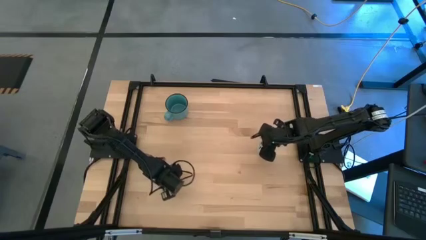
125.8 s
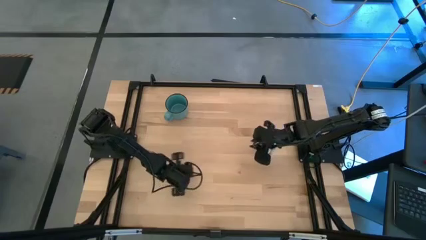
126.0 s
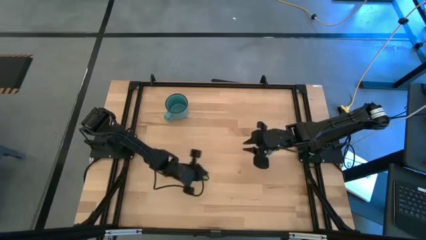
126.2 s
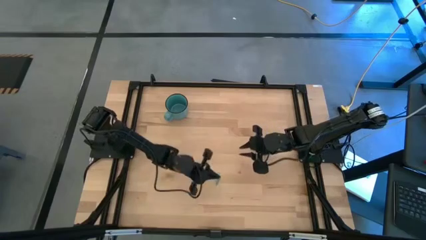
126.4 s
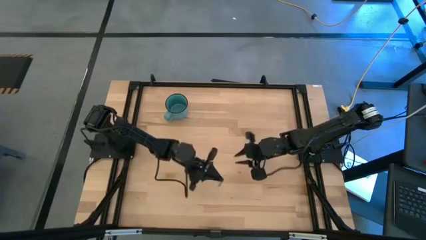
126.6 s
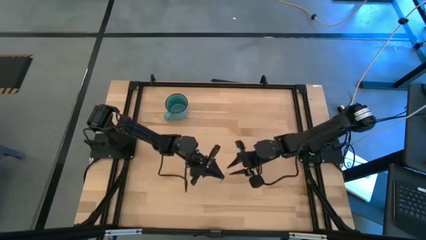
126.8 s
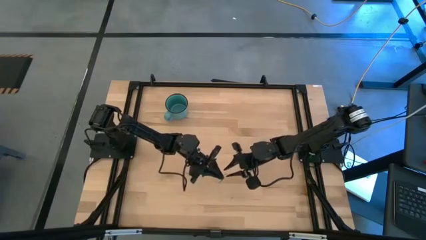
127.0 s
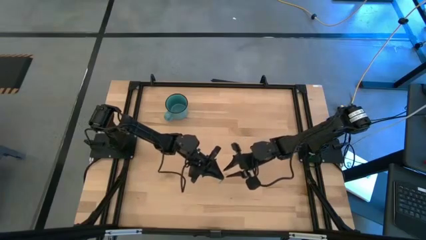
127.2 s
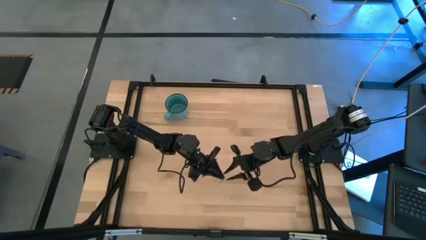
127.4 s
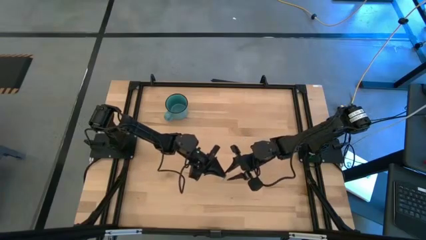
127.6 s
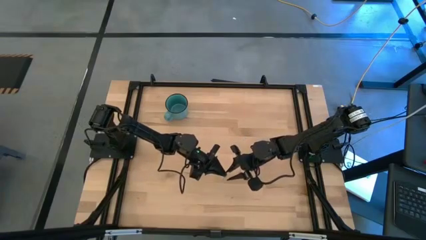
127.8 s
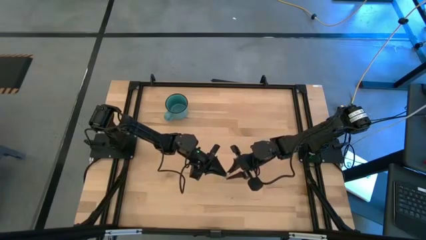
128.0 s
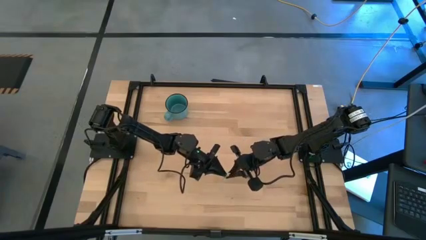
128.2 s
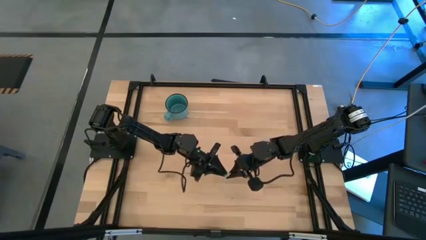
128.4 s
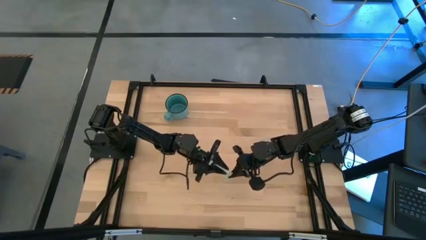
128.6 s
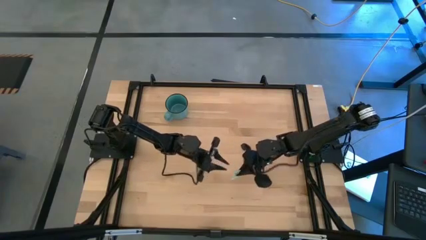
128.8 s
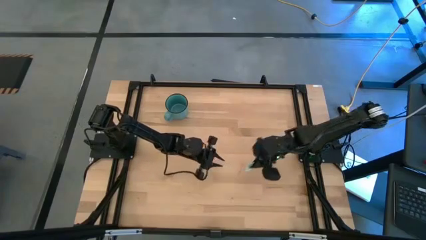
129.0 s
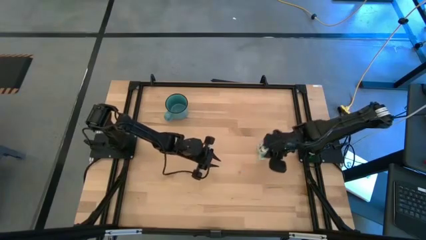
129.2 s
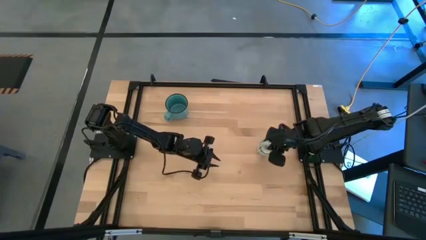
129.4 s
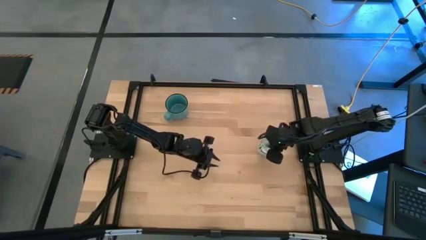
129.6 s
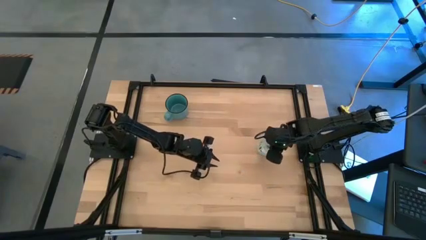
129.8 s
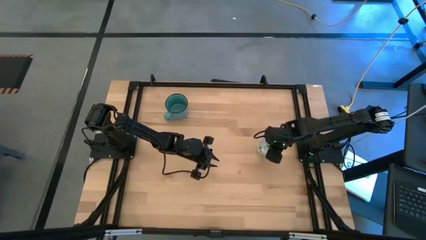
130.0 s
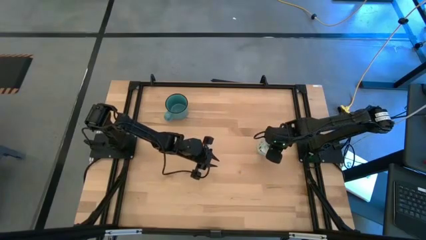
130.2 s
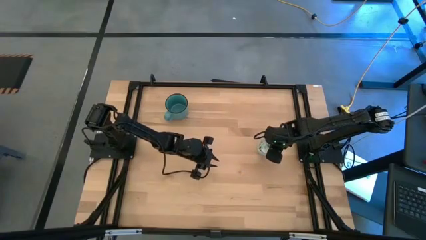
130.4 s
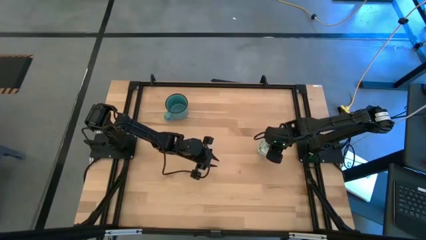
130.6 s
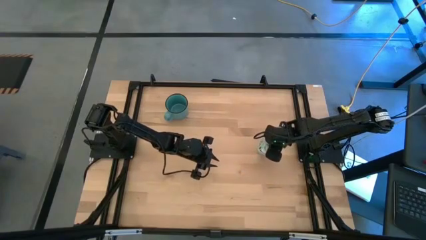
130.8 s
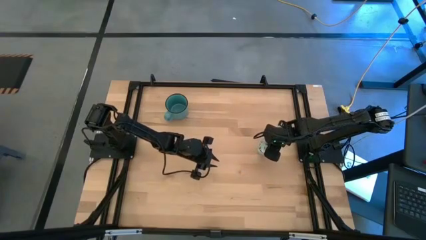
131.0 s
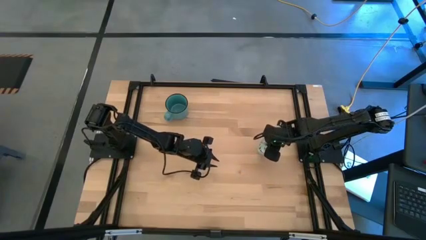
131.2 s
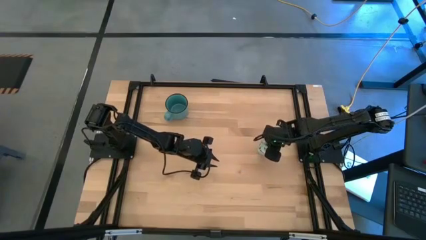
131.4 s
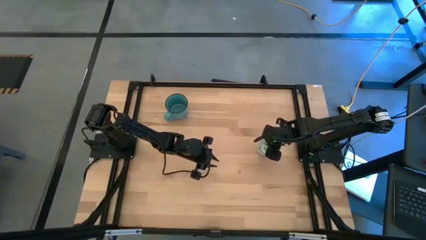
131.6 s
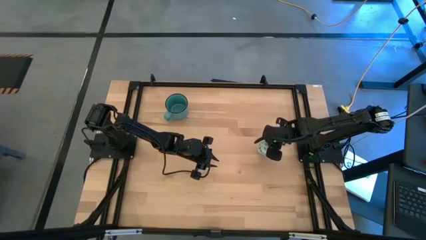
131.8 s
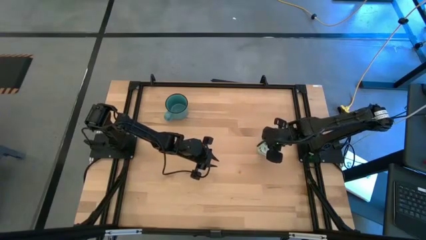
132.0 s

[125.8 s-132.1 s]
Task: Pick and place Stevia / Truvia into bins
Put the stevia packet into the transparent bin

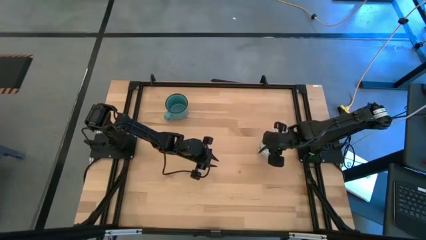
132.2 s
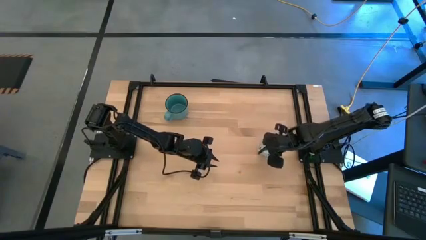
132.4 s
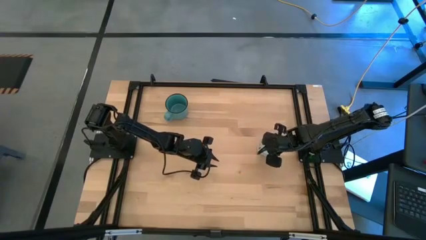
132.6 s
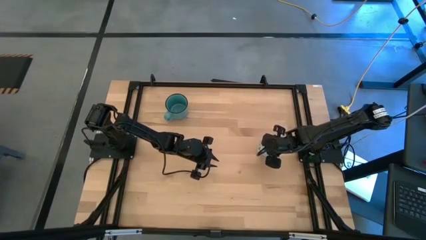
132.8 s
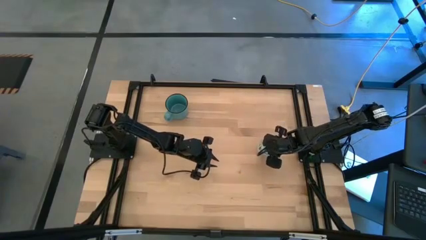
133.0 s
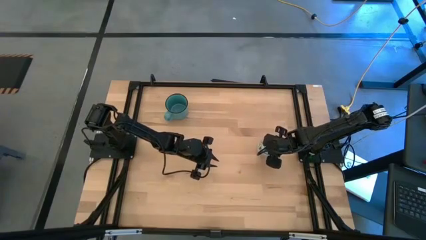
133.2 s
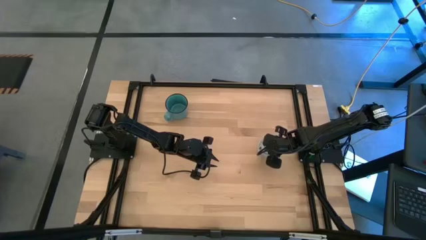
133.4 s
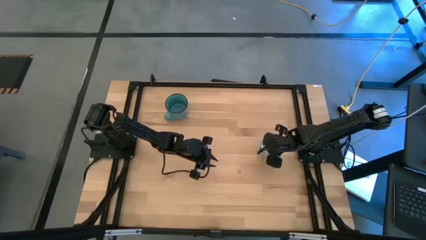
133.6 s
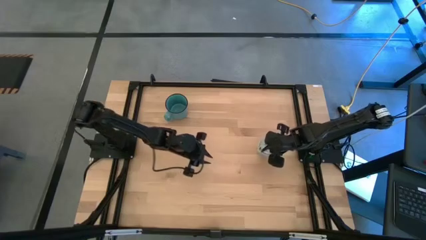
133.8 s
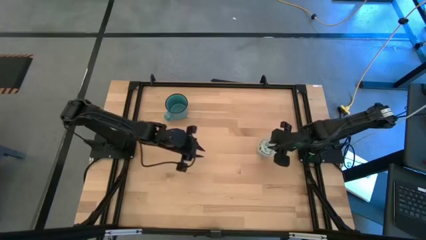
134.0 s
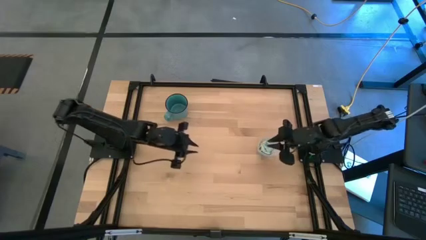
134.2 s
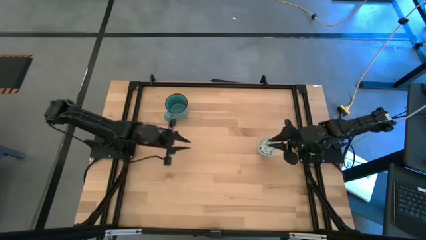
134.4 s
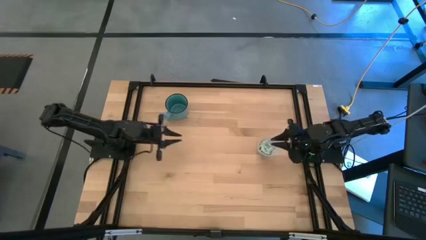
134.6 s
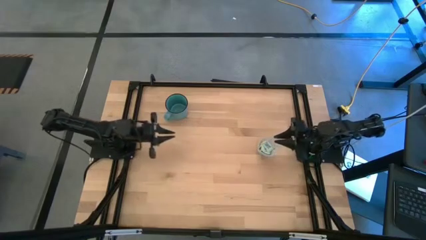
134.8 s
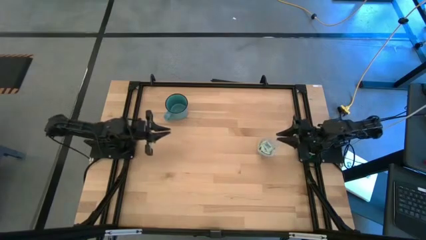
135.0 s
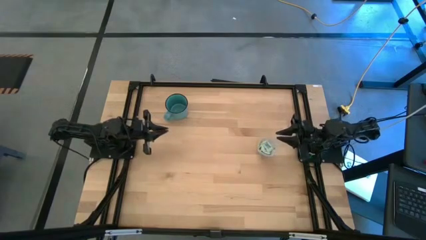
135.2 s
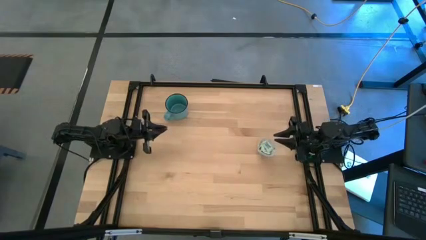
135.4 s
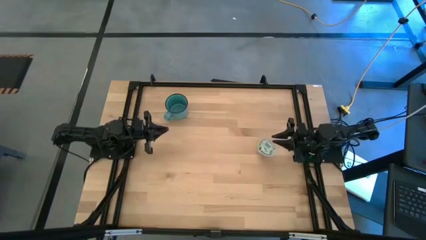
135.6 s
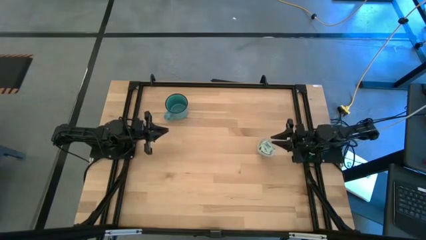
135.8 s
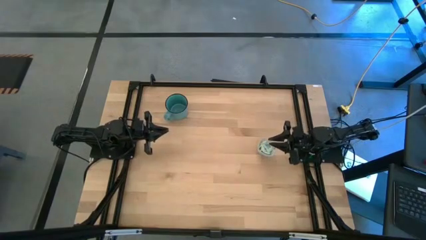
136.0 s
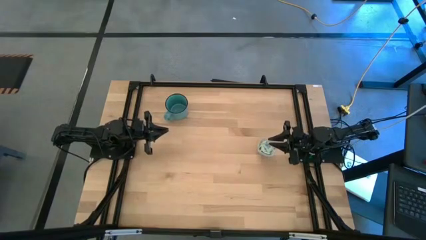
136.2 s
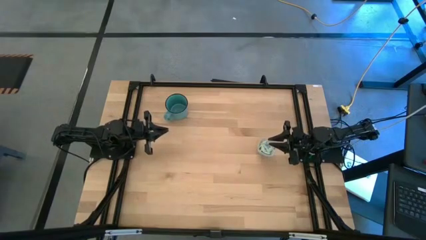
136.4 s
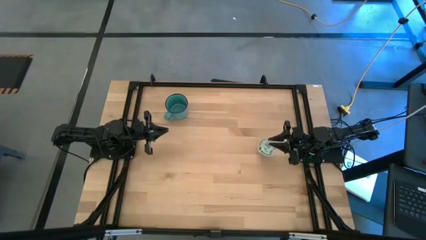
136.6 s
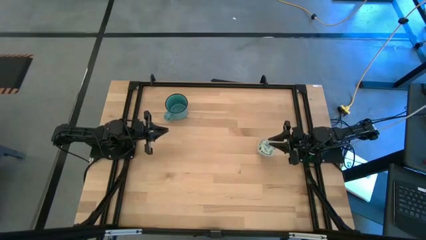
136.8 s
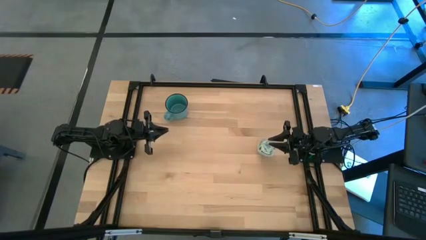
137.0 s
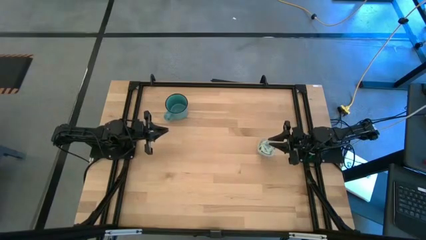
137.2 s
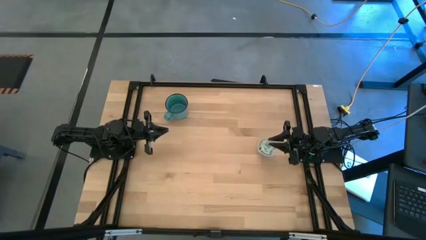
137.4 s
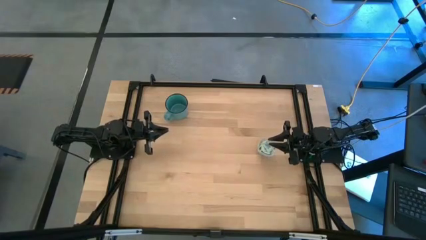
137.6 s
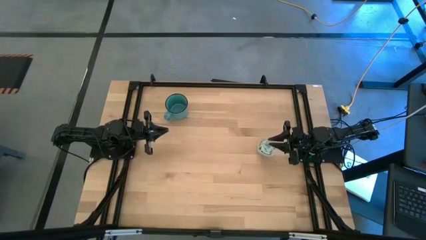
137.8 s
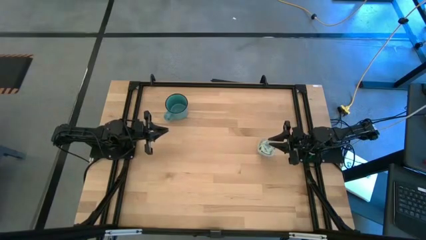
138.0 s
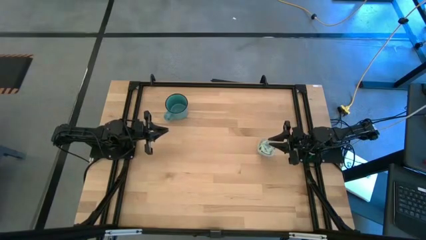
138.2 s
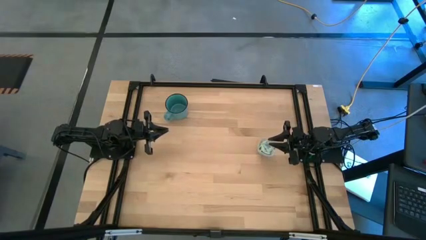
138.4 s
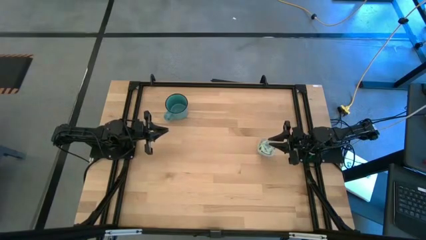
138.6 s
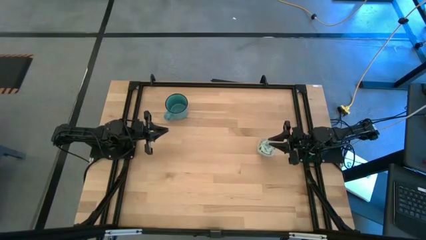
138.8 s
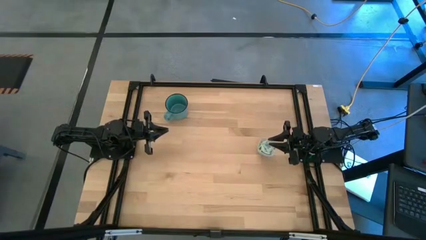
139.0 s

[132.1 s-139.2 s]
Return to Home Position
